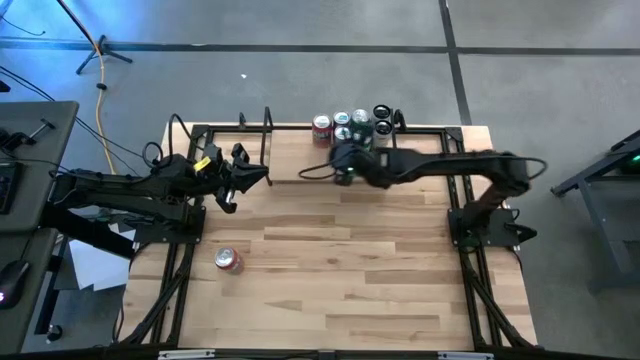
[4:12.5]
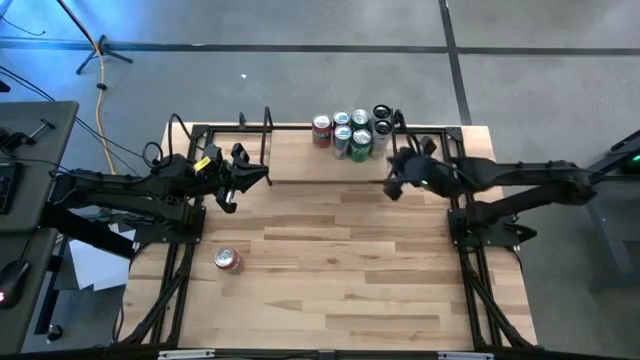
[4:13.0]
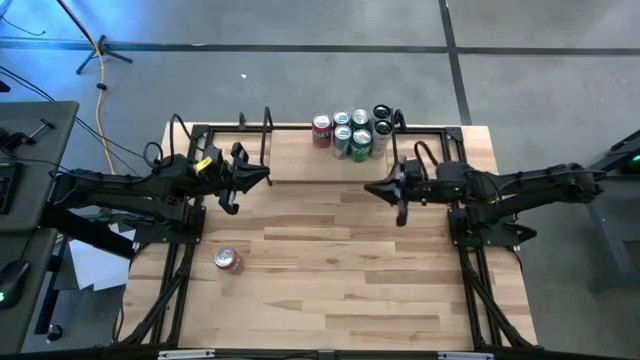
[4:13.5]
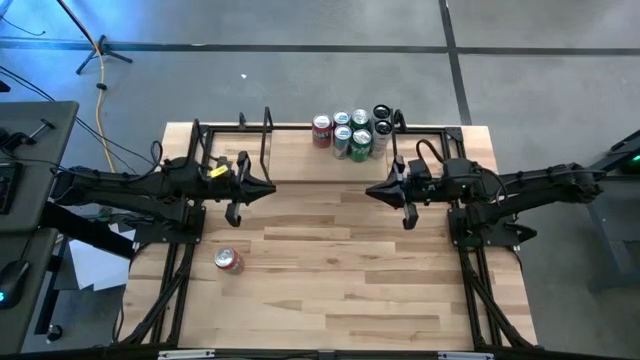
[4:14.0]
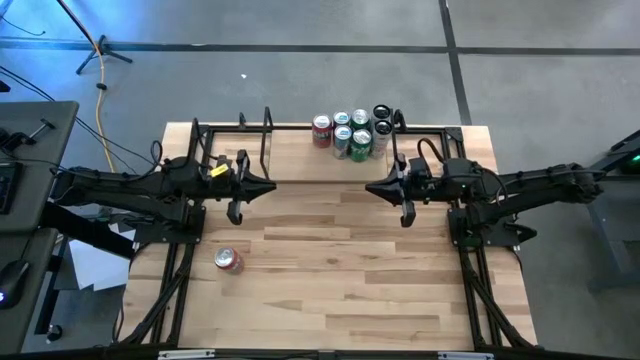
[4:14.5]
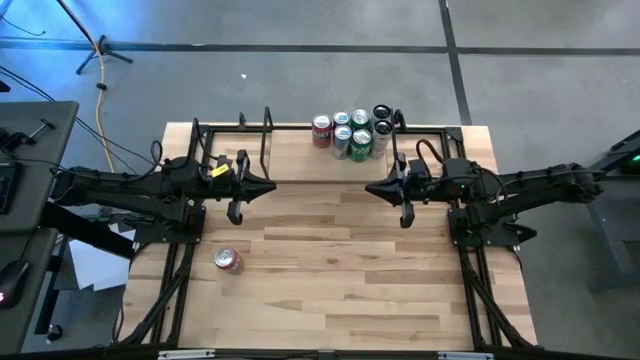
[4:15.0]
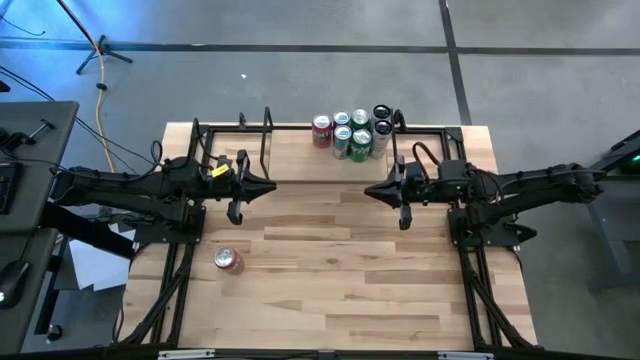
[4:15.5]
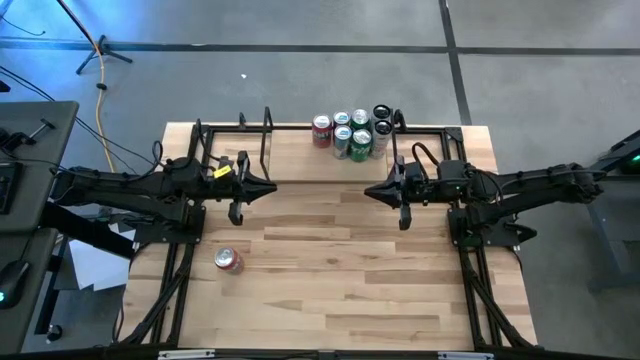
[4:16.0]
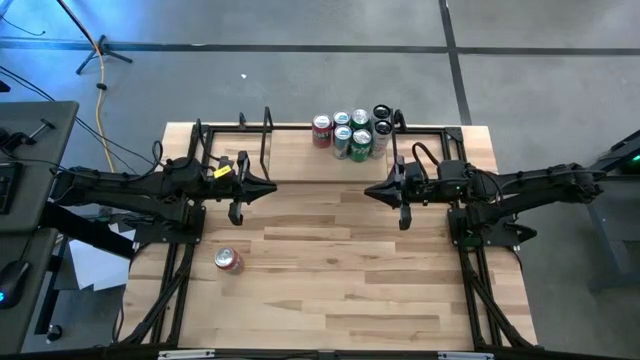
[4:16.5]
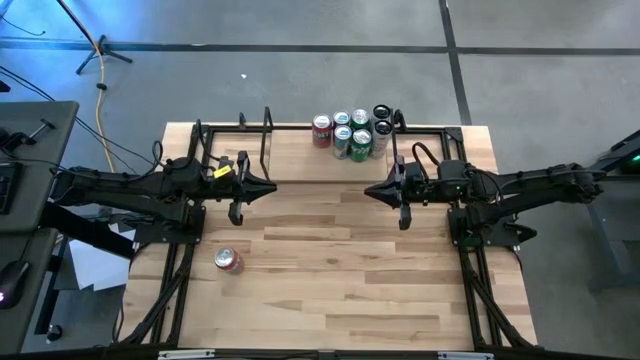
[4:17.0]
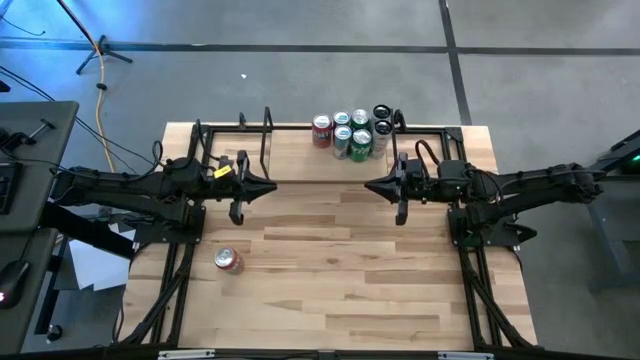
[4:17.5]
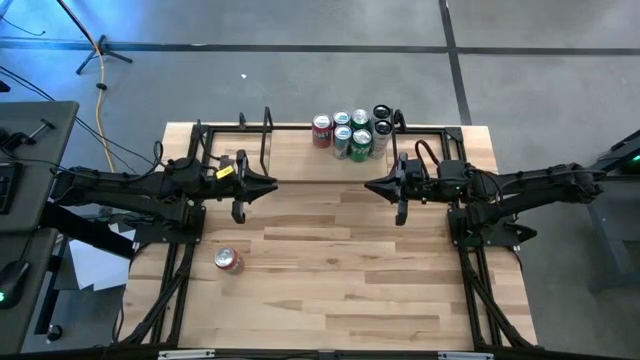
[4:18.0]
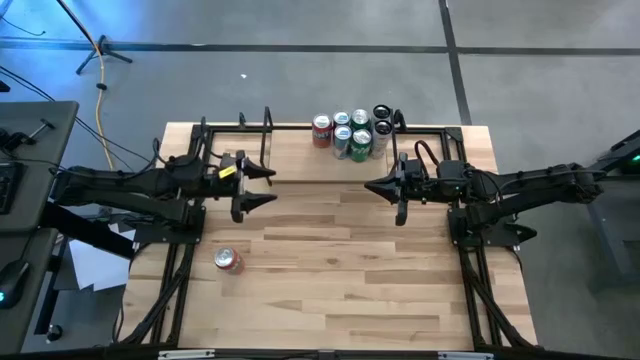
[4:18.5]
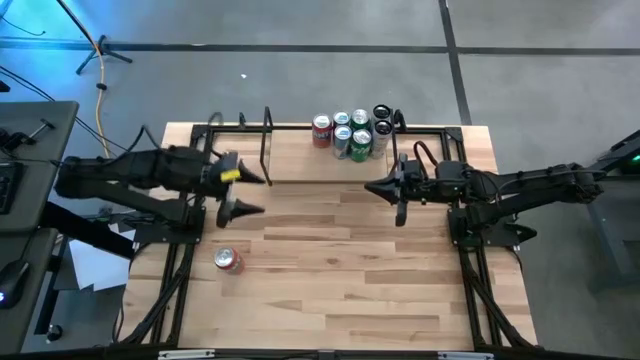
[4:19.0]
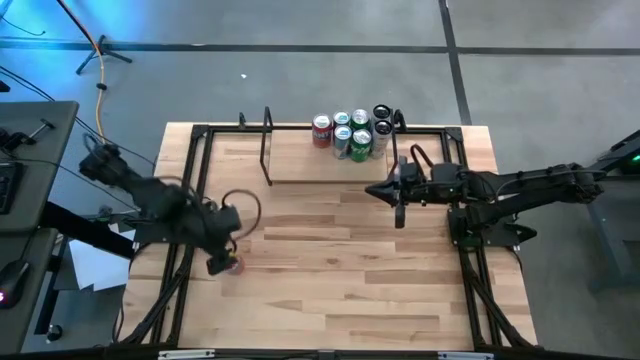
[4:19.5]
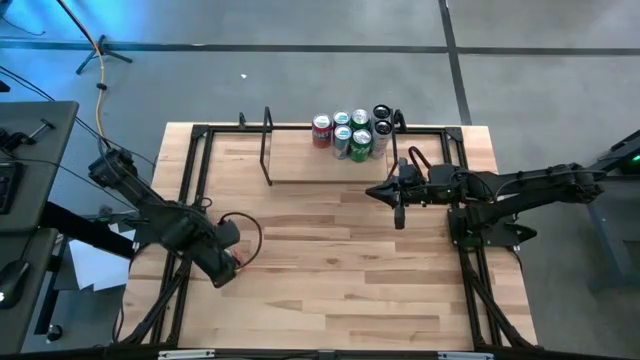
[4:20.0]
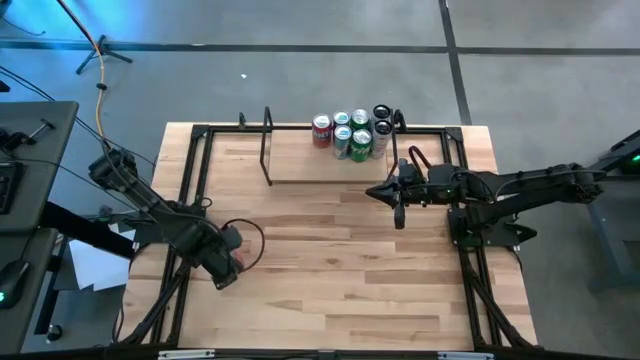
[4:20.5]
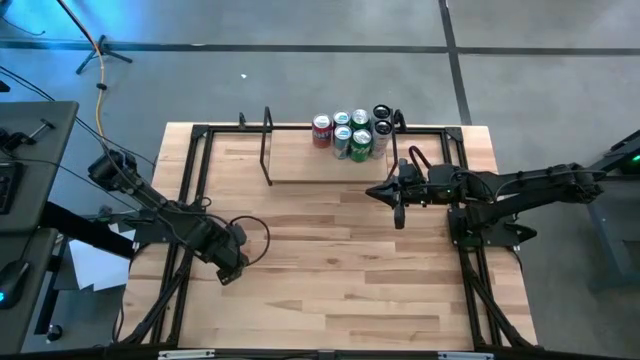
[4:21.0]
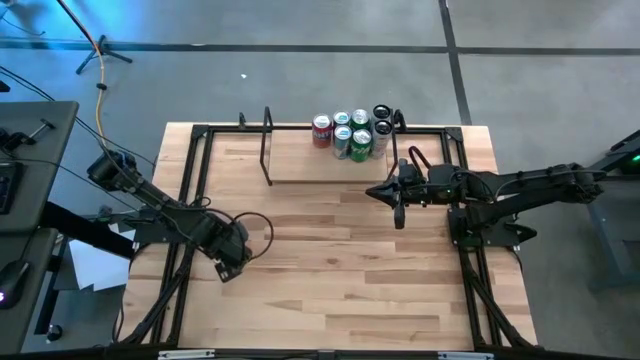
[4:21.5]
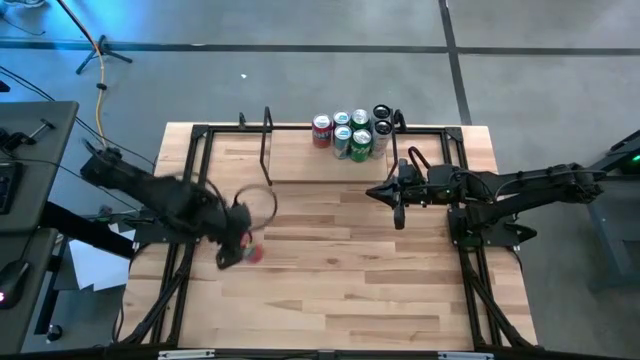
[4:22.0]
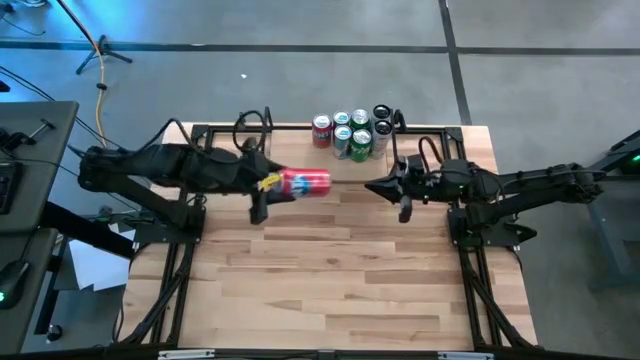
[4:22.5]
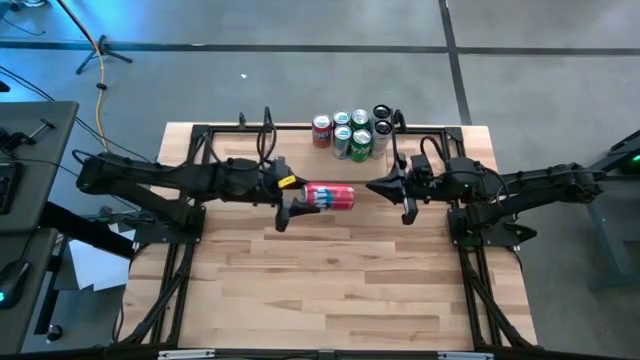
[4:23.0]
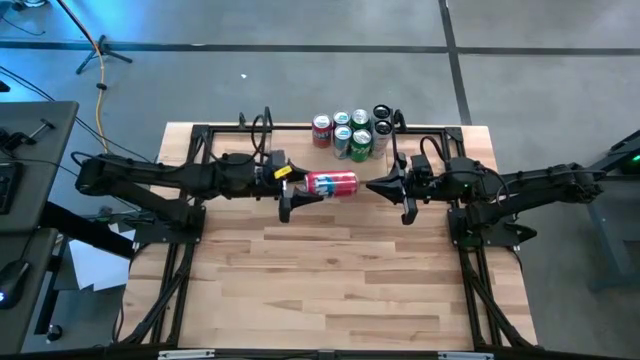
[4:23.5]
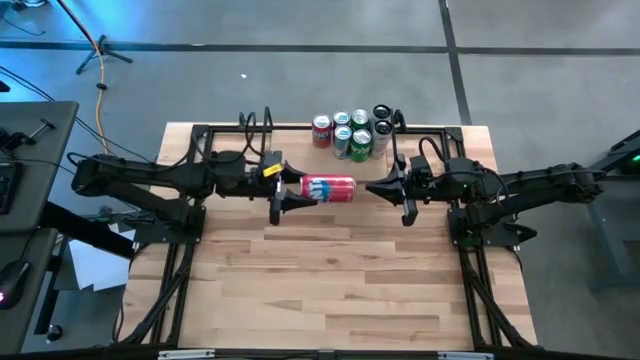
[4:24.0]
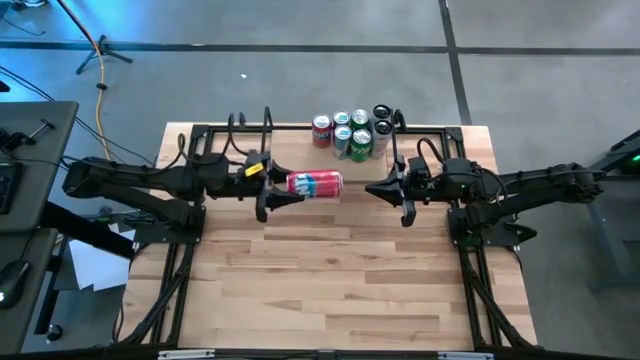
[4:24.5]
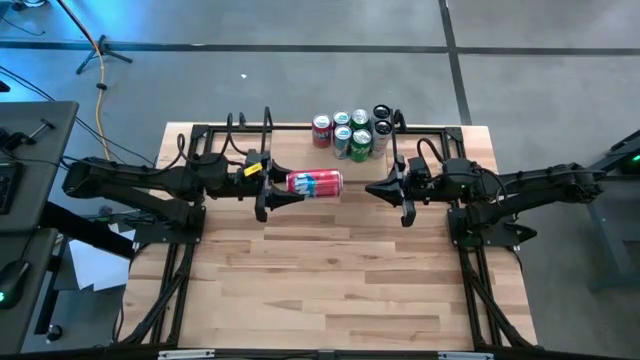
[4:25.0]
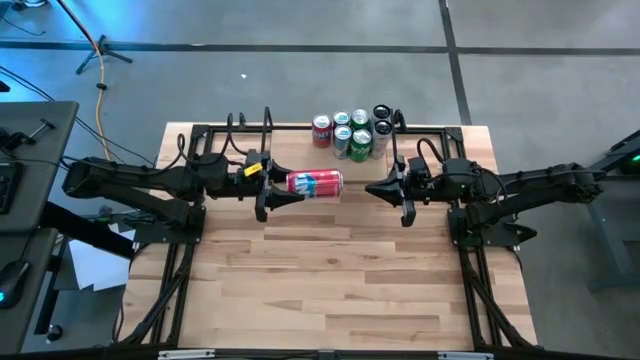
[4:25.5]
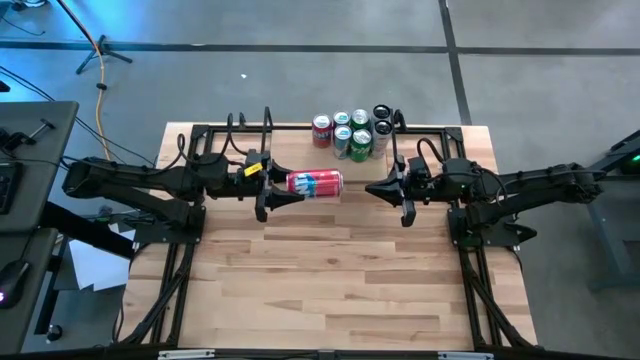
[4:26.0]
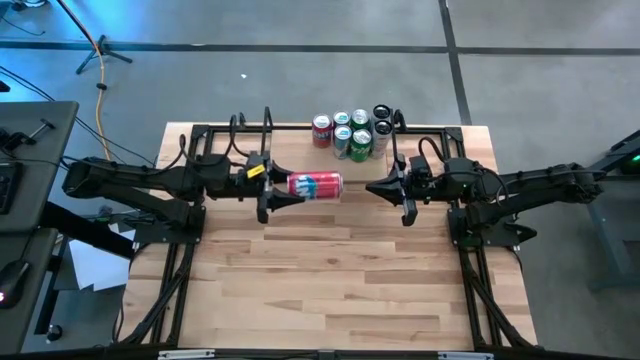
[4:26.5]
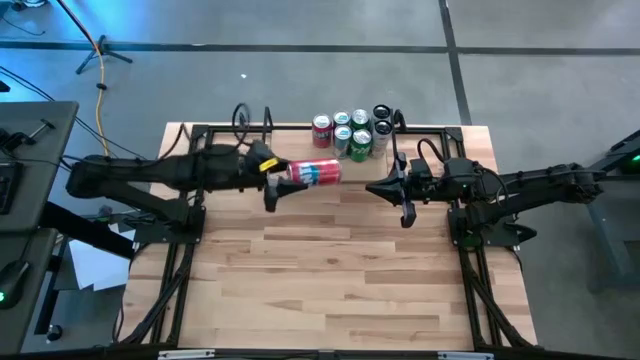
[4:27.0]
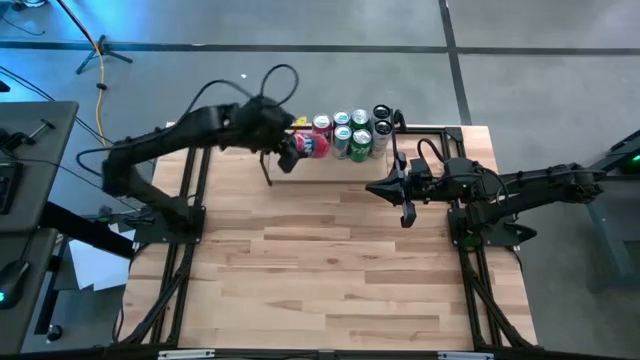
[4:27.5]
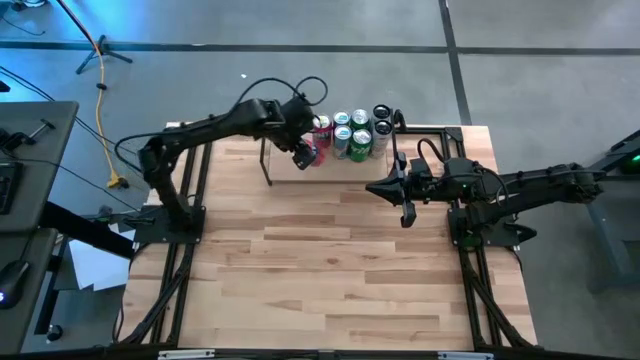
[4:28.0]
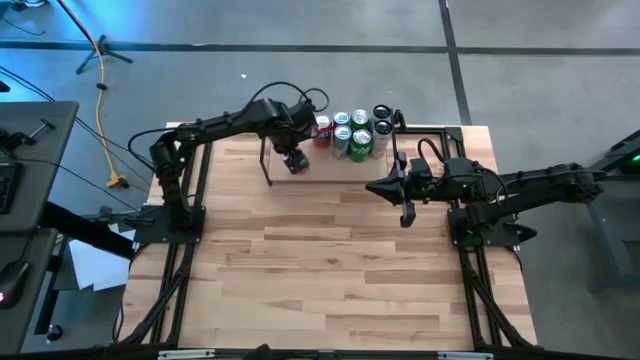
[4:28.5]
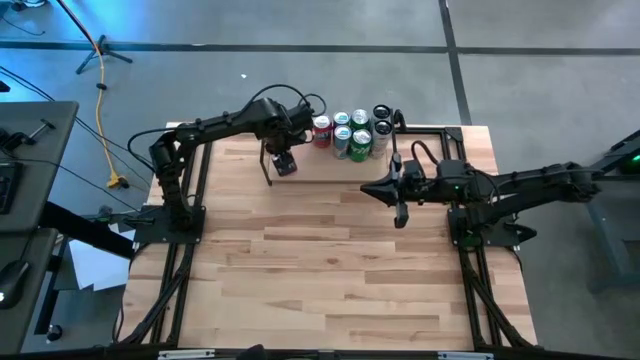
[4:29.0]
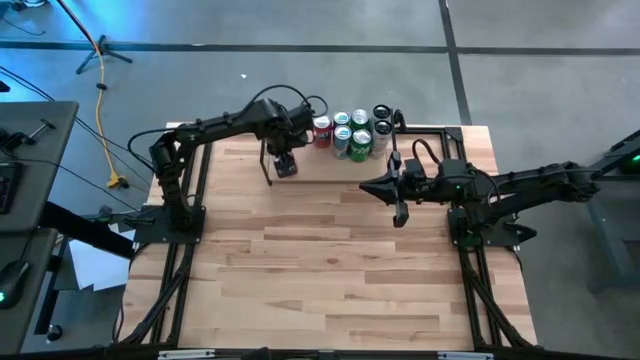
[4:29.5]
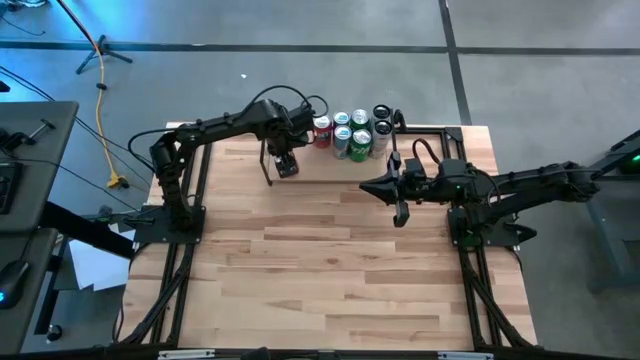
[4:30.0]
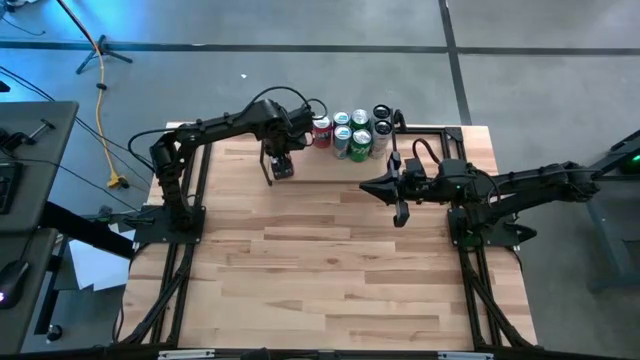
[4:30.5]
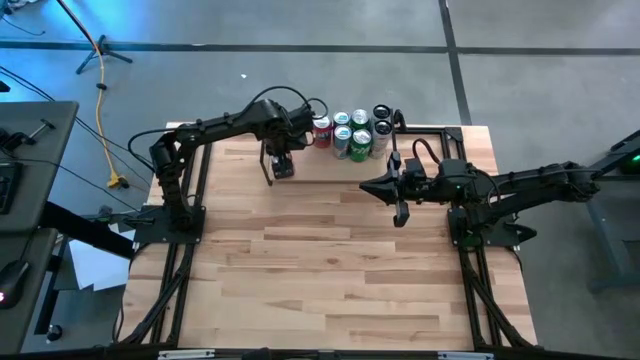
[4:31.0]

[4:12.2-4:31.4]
Task: Place canned beverage on shelf
Put the red soda can on the shelf and align it with the other red soda can

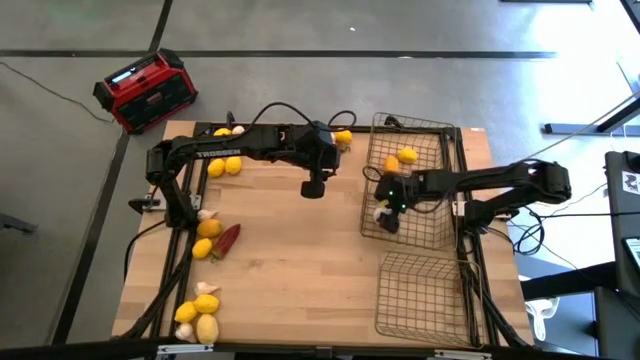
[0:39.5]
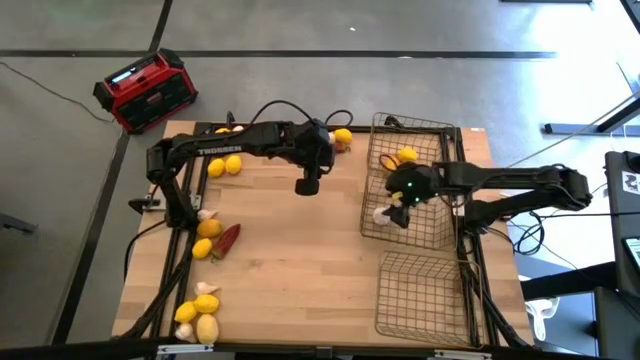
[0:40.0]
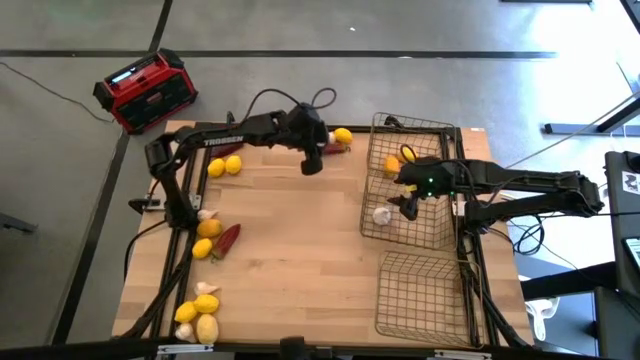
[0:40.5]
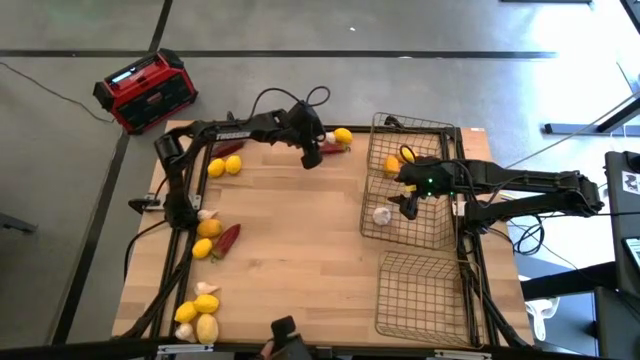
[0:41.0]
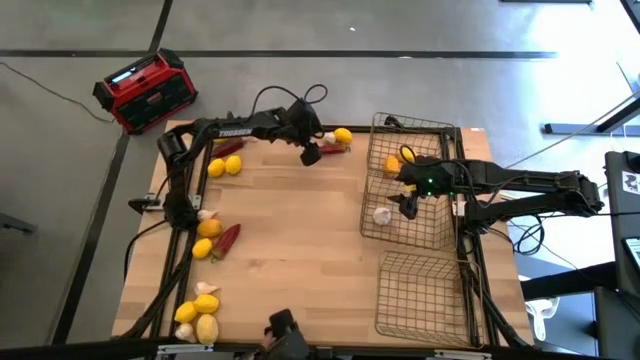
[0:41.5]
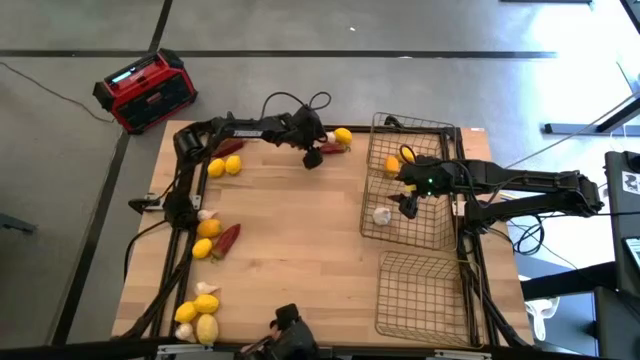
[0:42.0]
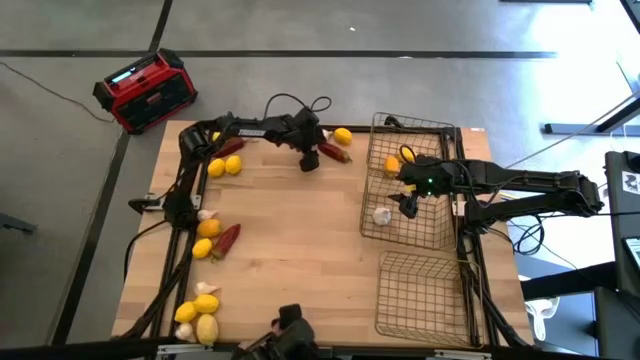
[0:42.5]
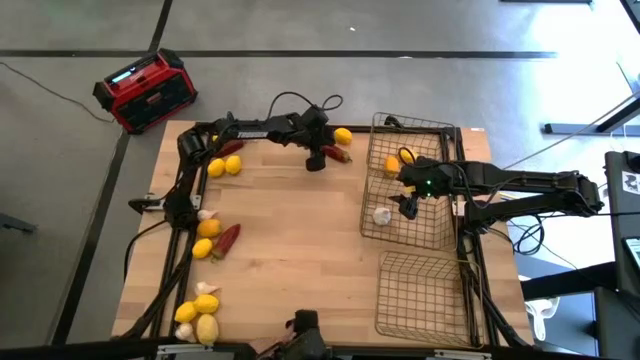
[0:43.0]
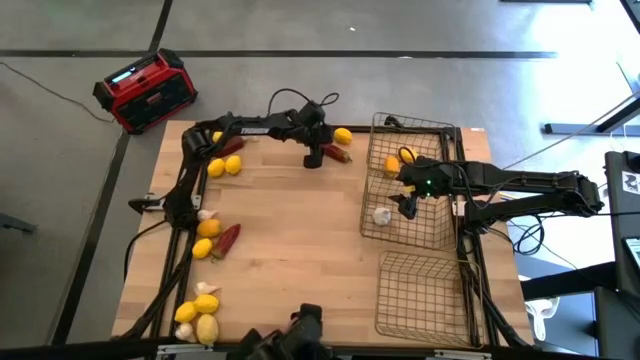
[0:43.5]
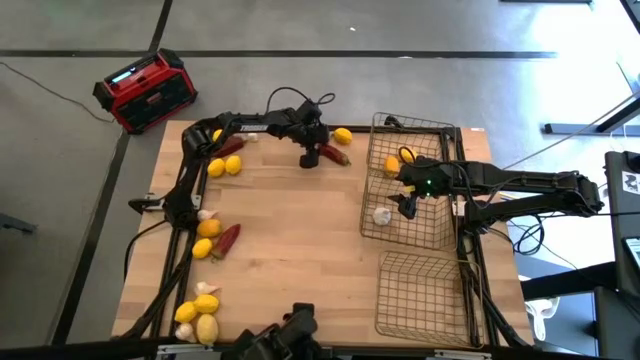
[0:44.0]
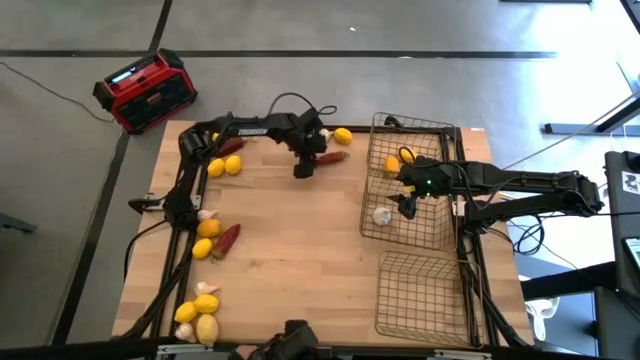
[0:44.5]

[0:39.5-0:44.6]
Task: Sort produce into baskets
Put the red chili pepper into the bottom wire basket
